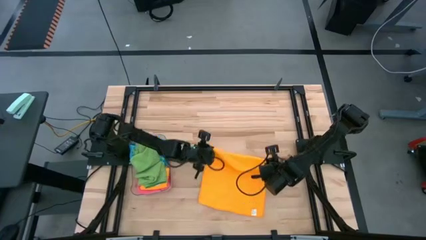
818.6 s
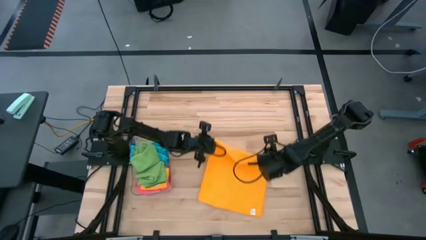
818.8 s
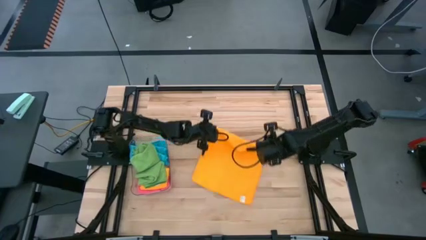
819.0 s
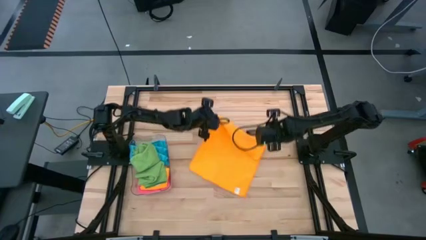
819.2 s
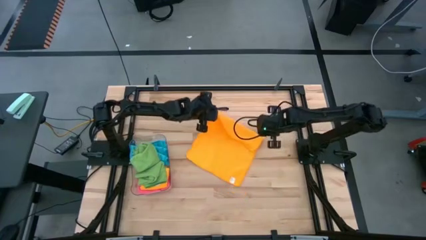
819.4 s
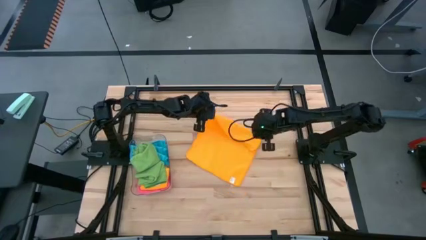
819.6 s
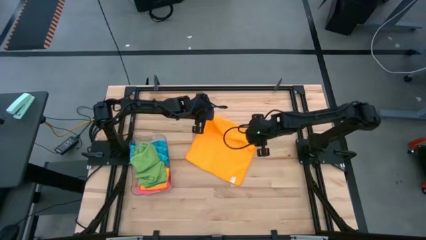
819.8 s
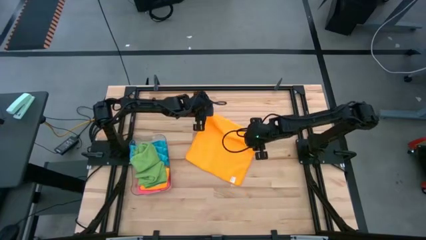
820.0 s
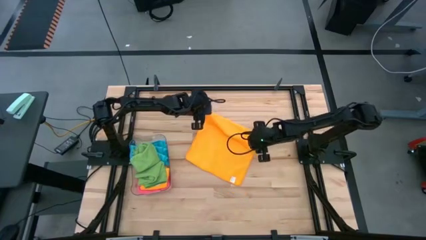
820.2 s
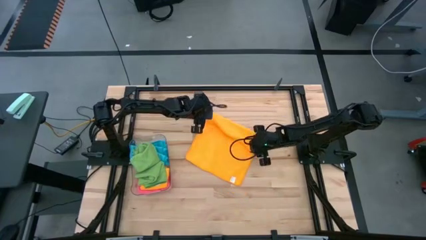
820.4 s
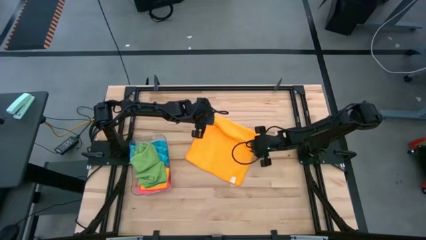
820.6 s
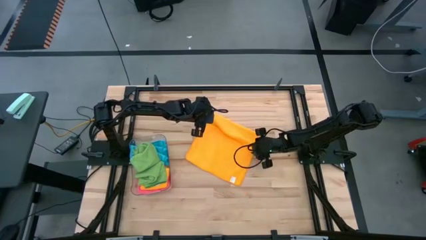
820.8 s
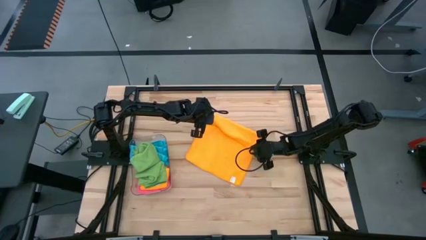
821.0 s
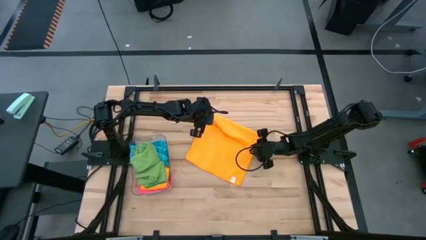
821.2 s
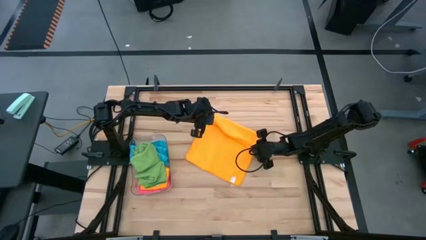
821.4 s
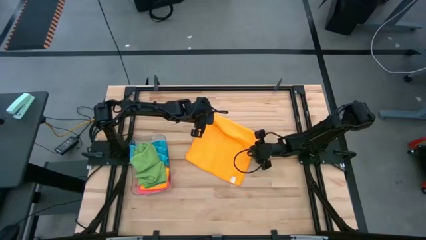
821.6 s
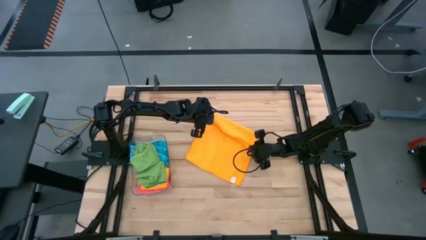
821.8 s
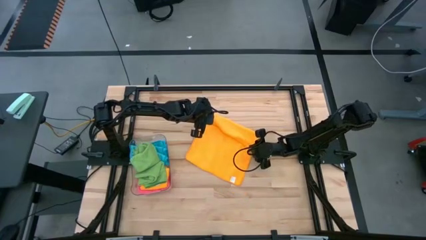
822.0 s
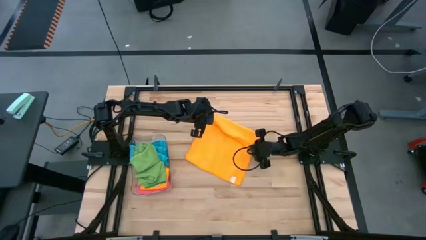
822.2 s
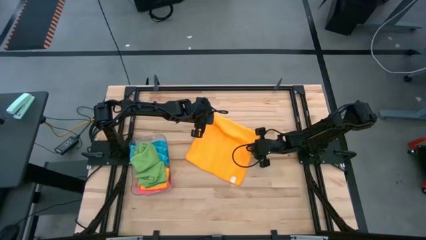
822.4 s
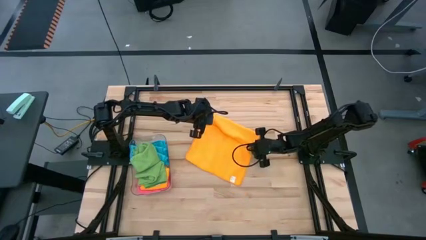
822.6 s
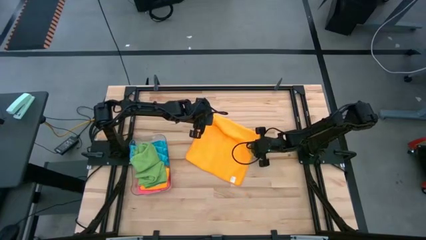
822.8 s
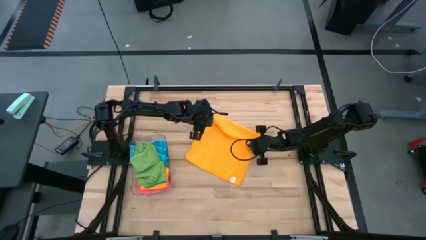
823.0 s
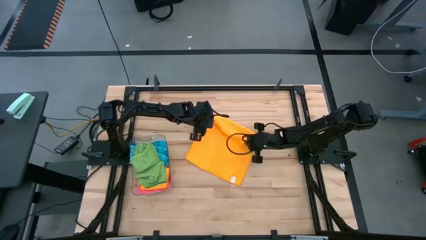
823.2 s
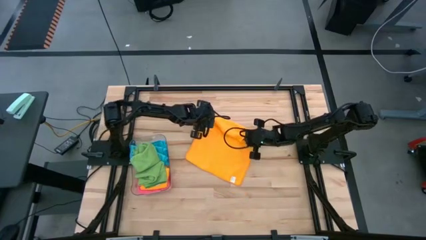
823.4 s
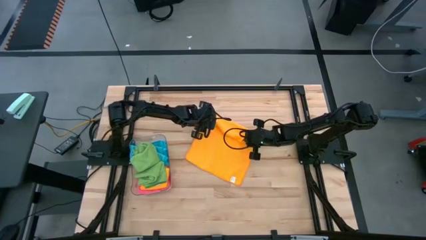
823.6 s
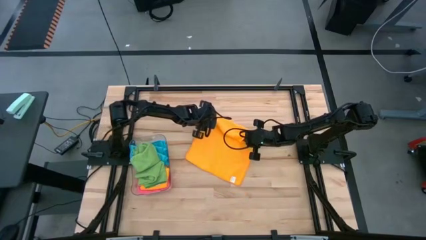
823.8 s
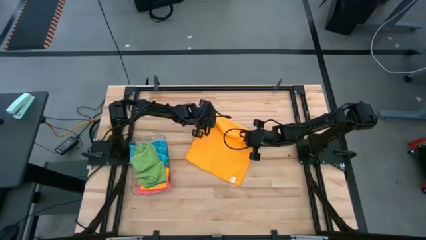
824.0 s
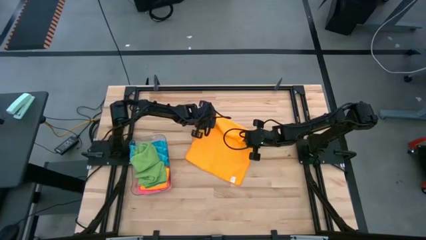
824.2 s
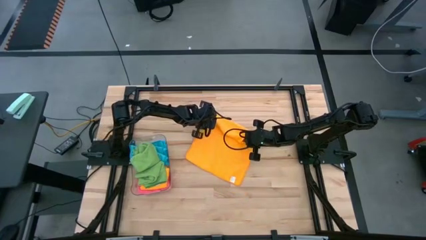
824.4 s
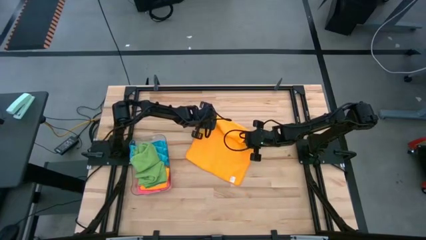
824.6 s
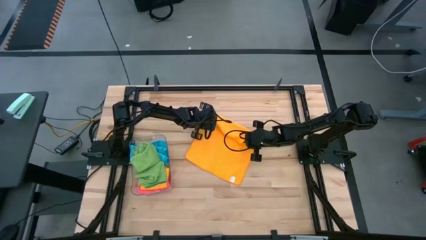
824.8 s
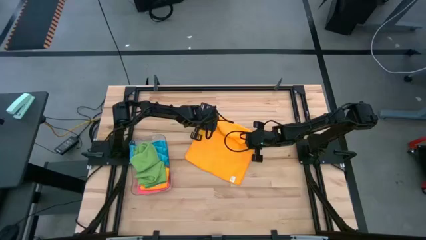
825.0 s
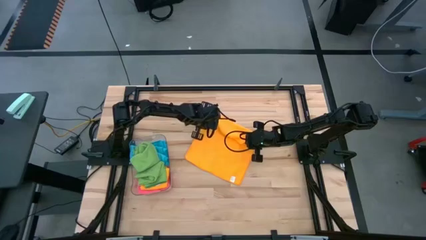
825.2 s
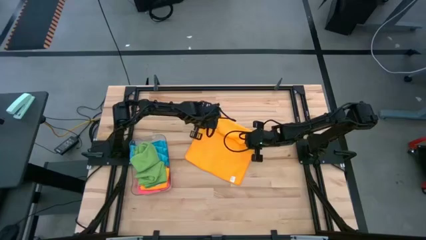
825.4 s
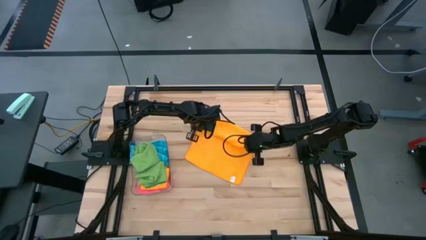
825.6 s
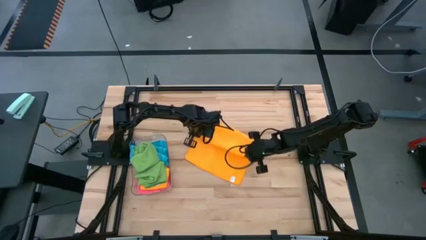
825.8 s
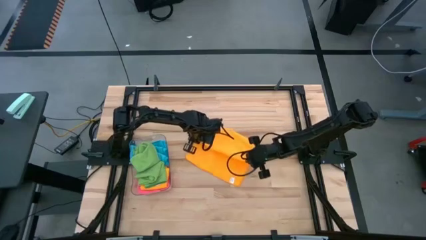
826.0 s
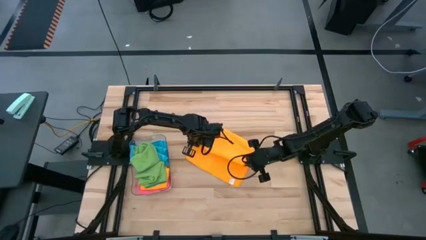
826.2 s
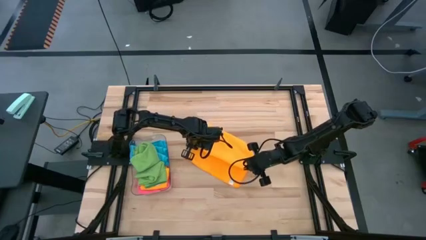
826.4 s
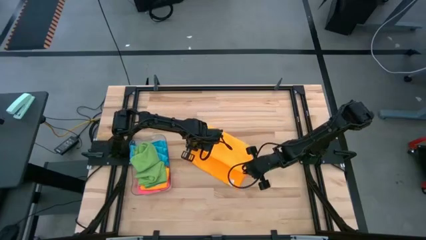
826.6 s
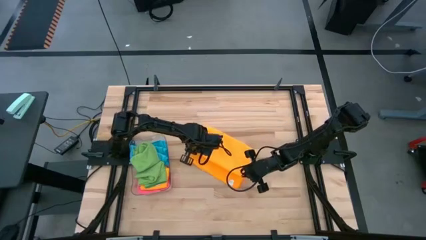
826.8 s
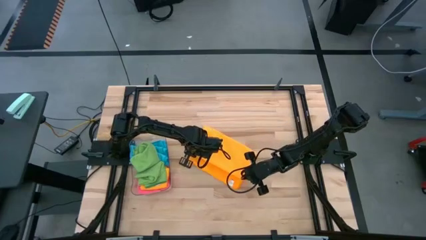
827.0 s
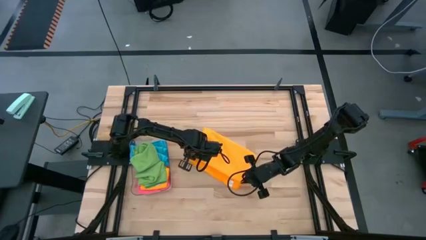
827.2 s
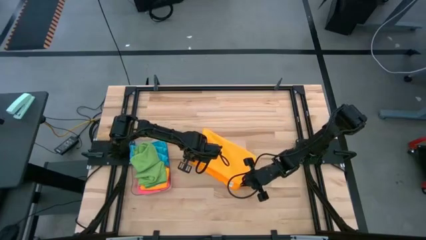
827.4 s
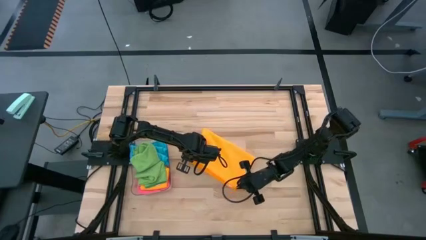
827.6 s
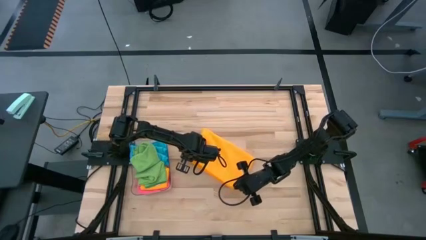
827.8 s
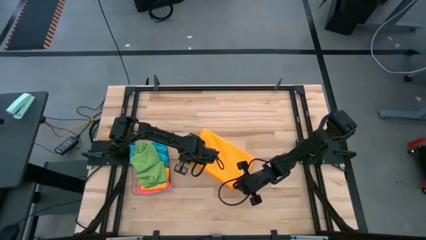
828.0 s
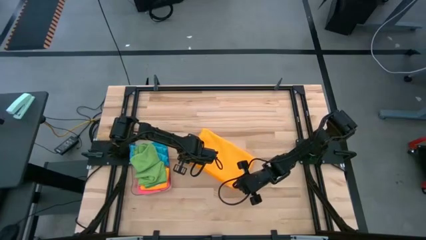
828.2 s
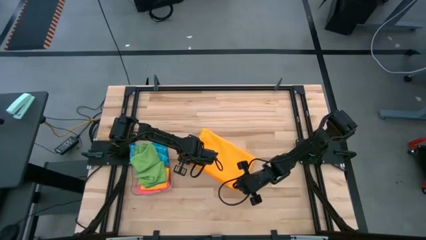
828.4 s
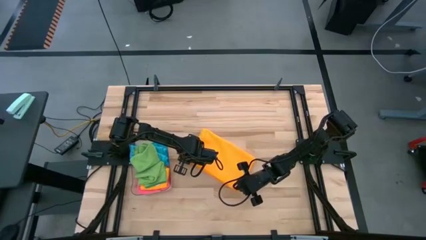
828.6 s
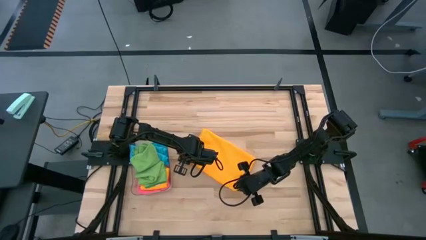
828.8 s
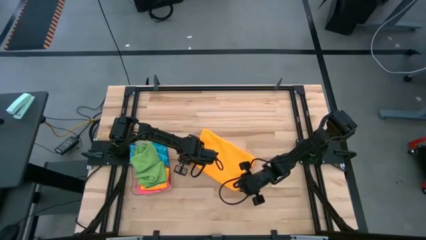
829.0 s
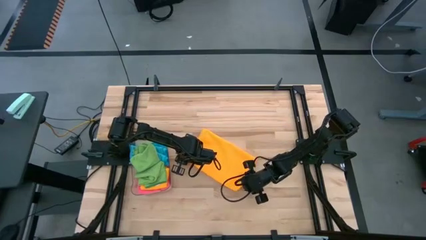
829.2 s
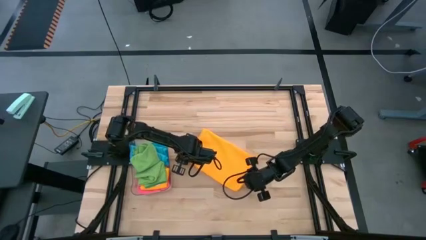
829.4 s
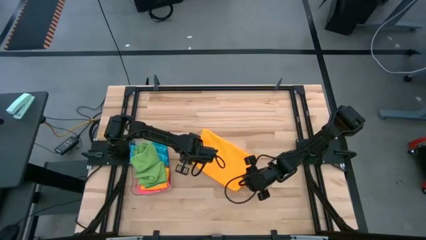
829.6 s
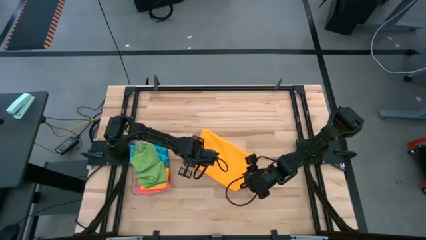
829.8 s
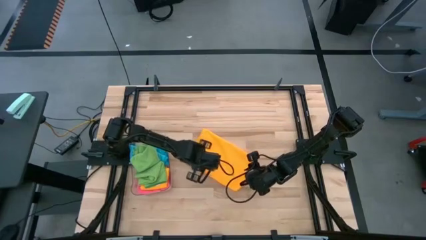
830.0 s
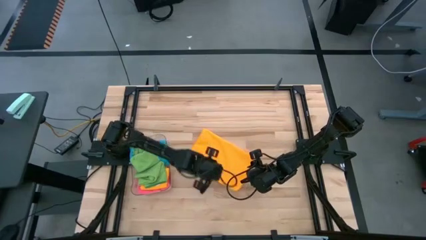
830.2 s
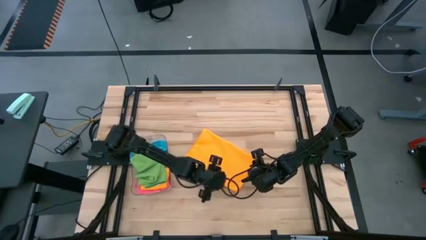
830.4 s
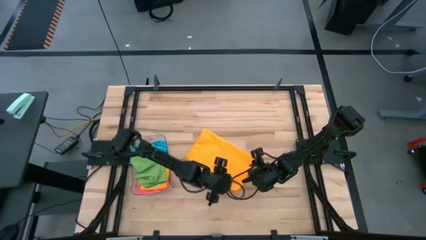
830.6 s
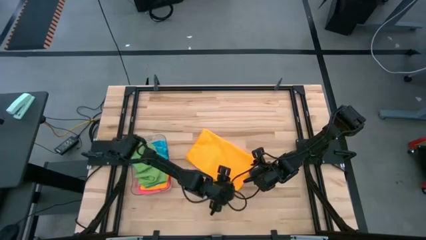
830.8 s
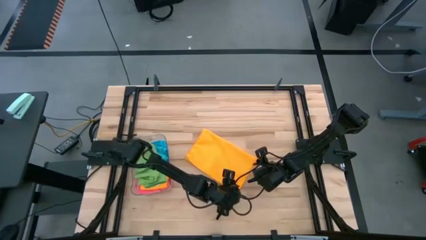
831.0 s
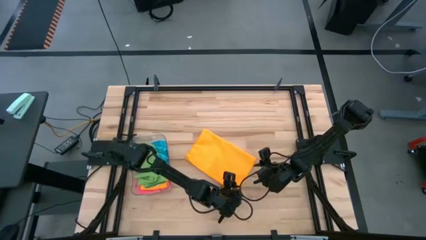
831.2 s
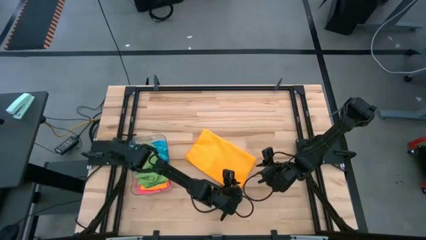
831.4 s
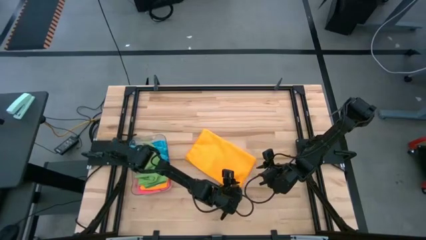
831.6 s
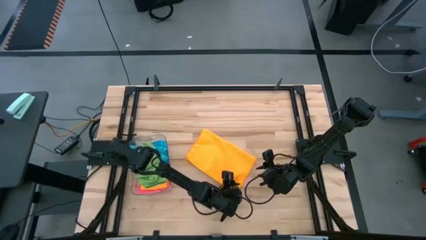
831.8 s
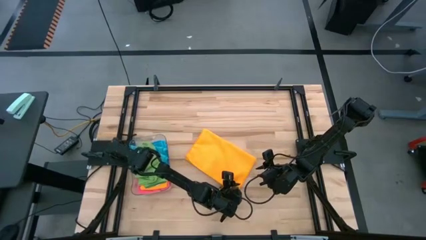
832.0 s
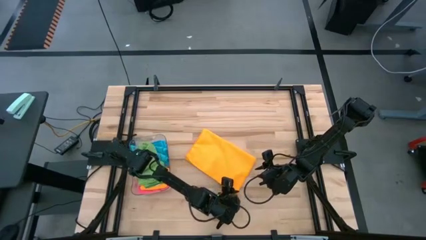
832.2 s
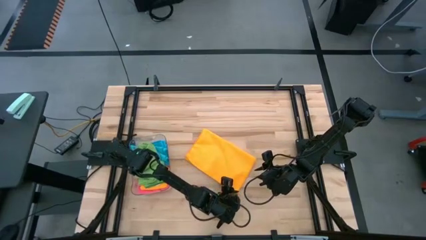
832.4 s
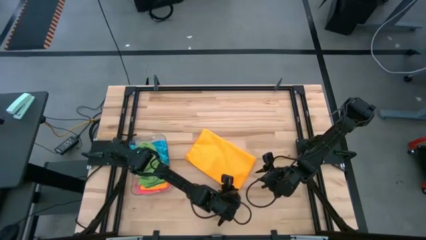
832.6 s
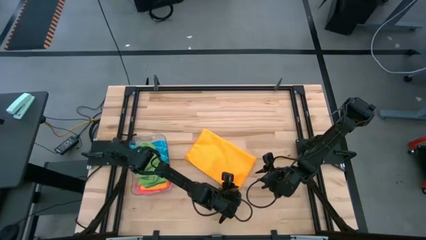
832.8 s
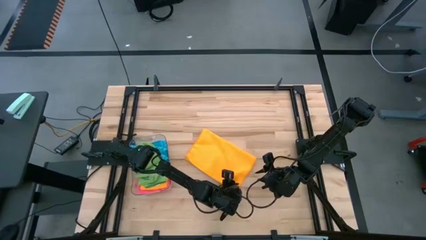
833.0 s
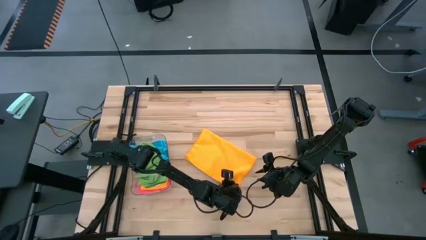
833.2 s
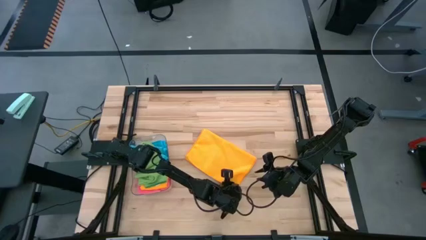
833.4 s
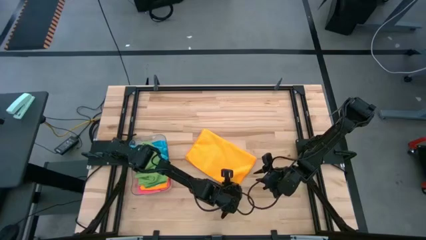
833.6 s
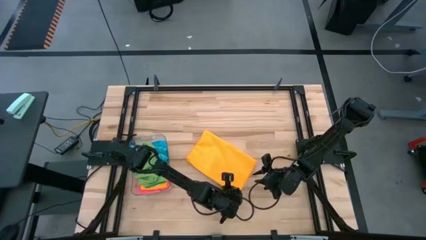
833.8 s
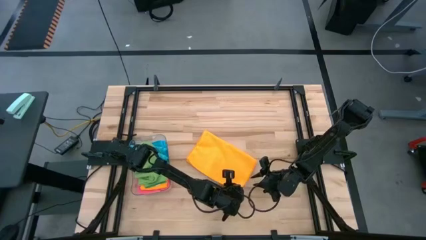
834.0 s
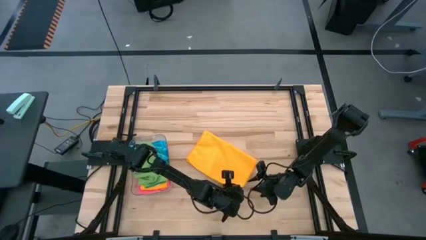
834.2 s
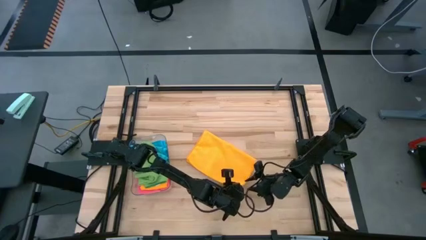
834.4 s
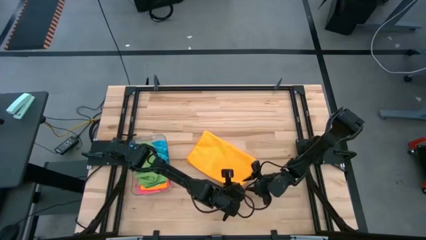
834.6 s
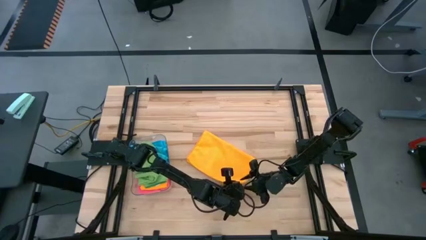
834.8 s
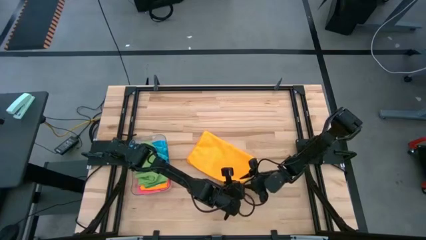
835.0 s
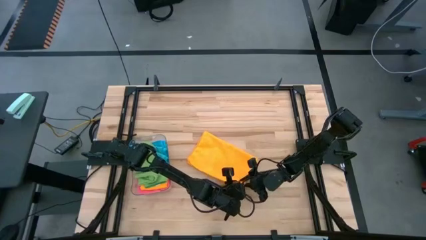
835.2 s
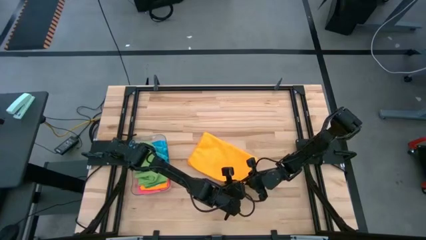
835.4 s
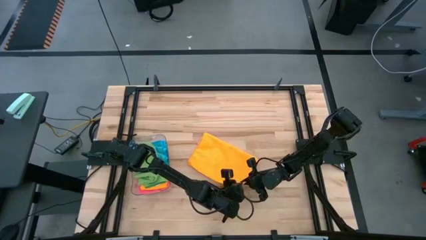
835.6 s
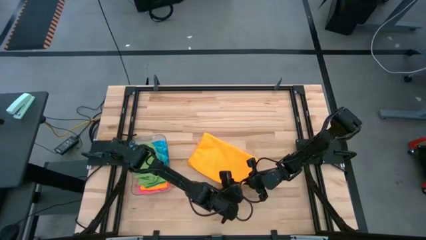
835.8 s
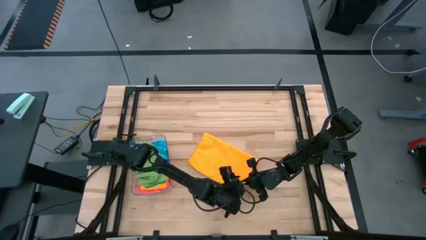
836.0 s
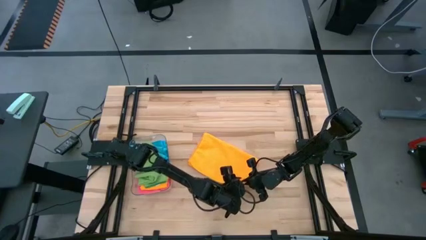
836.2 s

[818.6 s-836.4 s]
Task: Fold microfiber towels
Fold the yellow microfiber cloth
